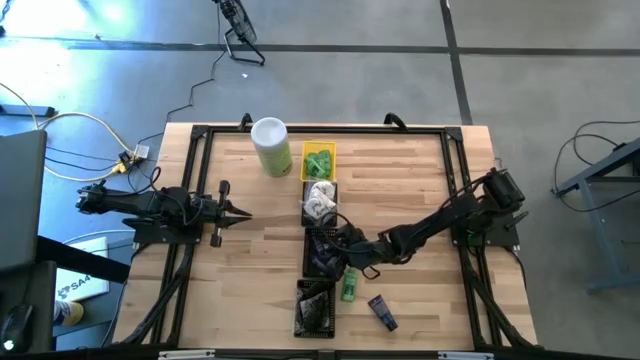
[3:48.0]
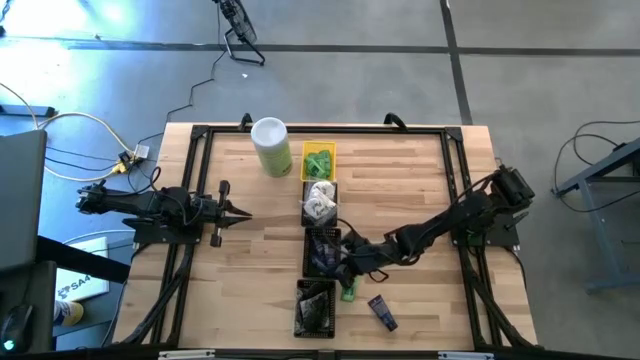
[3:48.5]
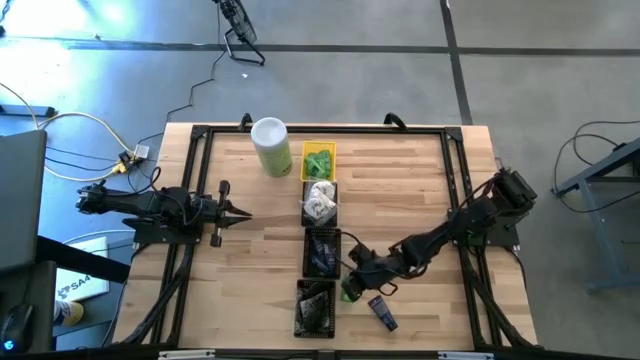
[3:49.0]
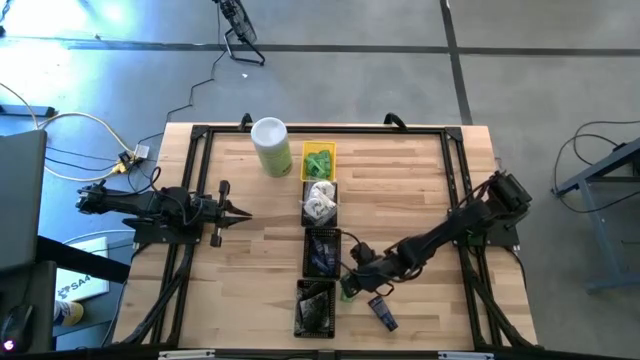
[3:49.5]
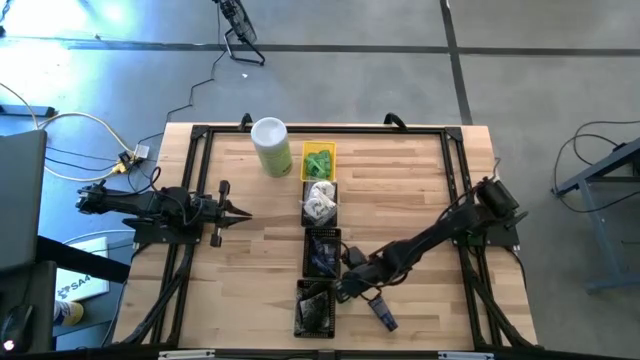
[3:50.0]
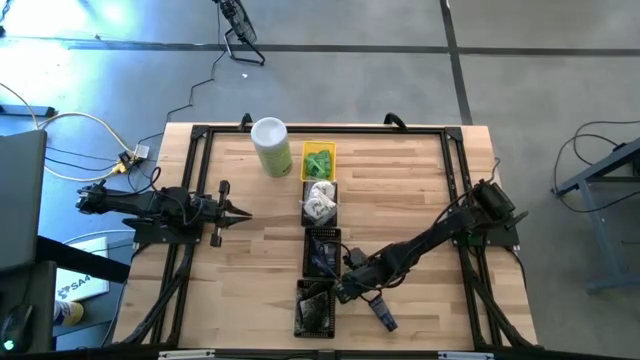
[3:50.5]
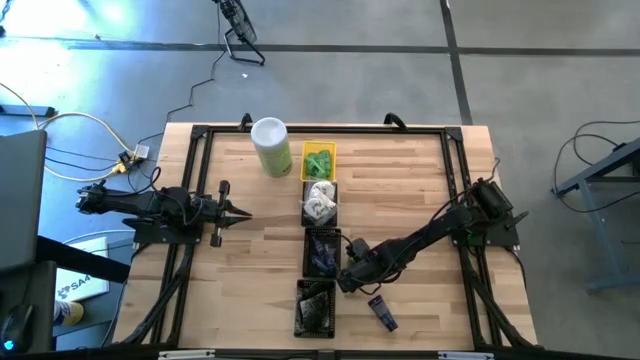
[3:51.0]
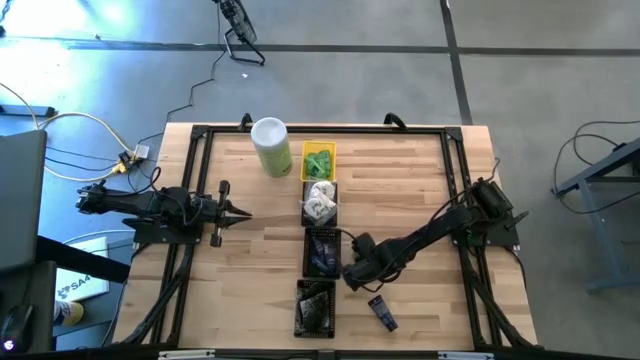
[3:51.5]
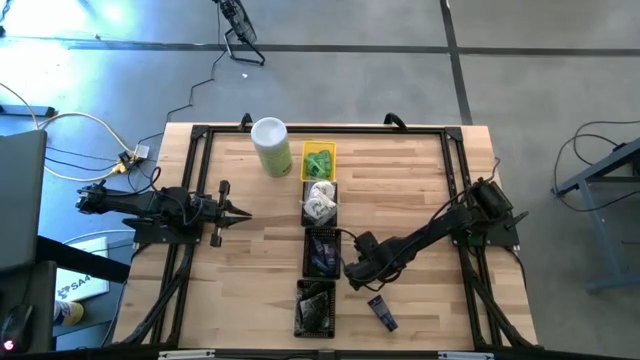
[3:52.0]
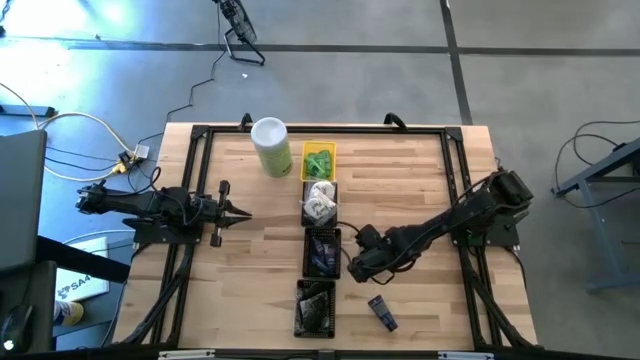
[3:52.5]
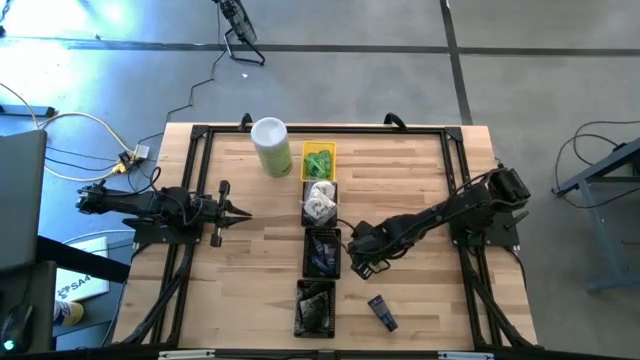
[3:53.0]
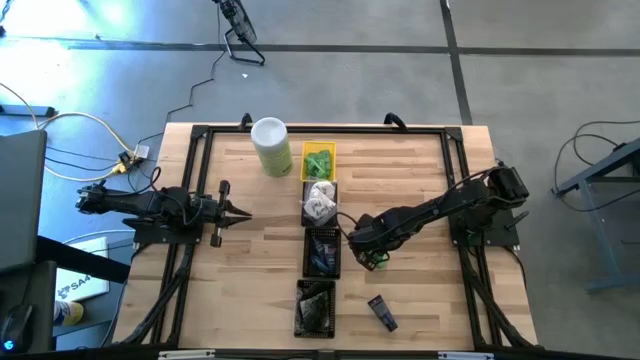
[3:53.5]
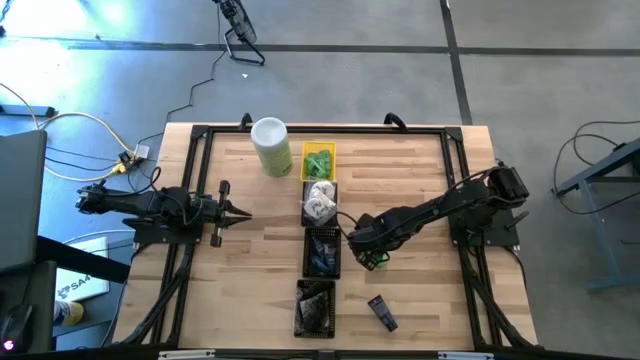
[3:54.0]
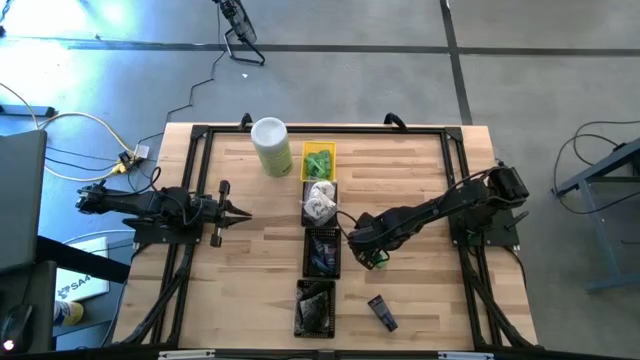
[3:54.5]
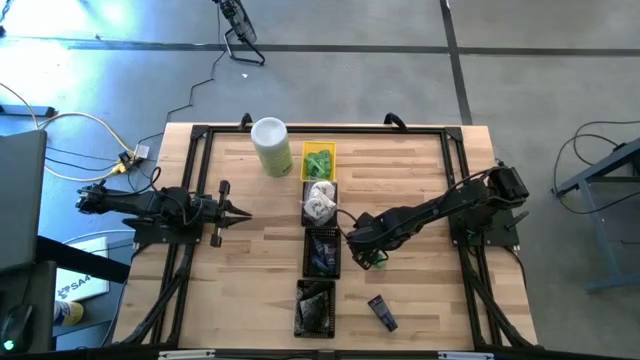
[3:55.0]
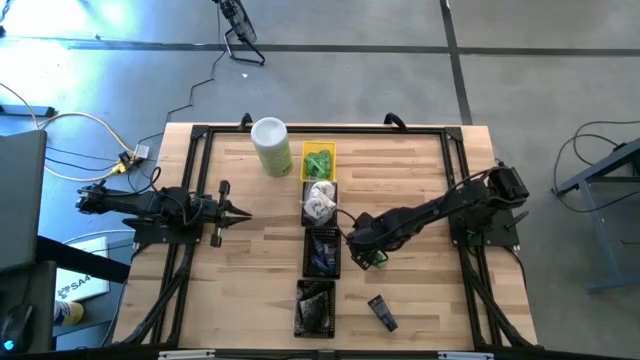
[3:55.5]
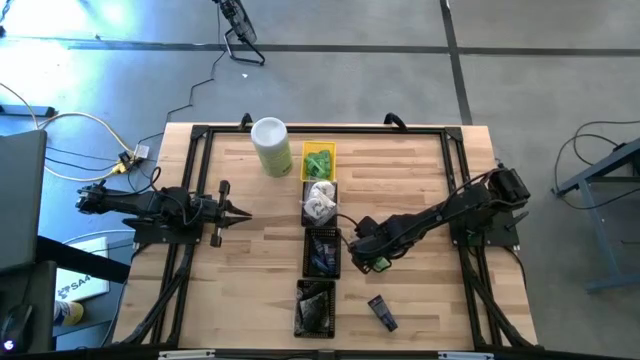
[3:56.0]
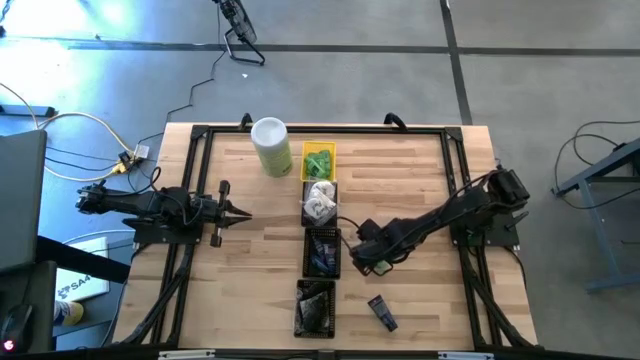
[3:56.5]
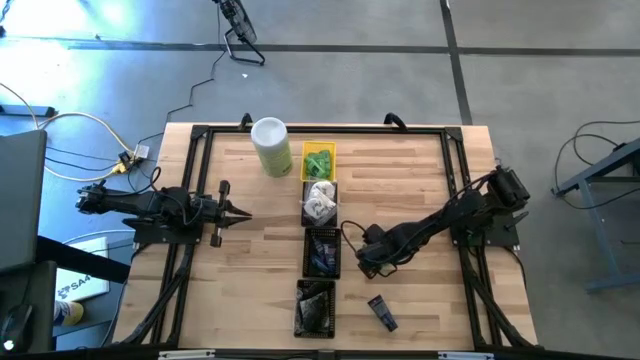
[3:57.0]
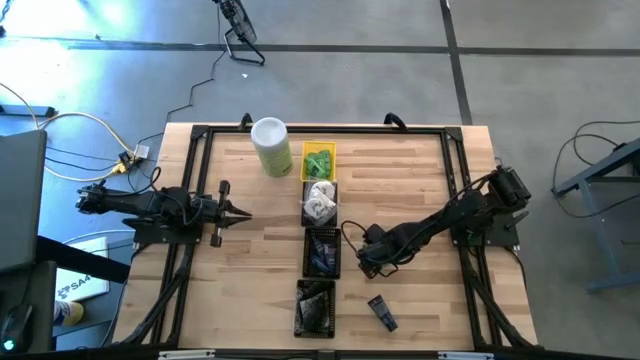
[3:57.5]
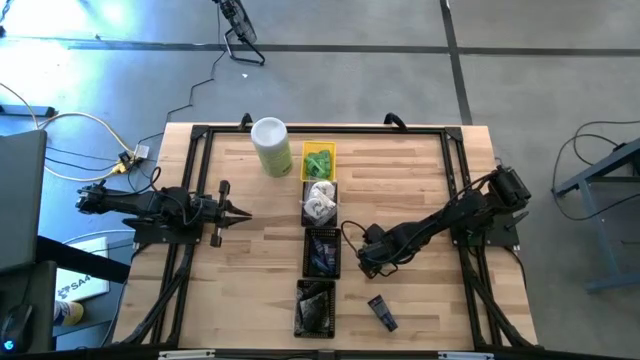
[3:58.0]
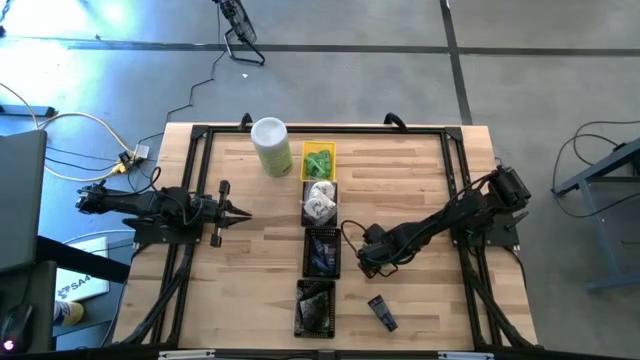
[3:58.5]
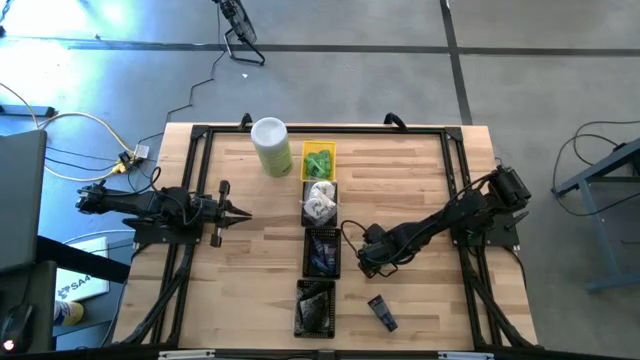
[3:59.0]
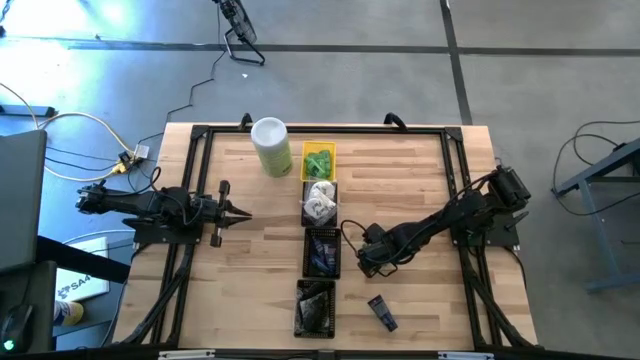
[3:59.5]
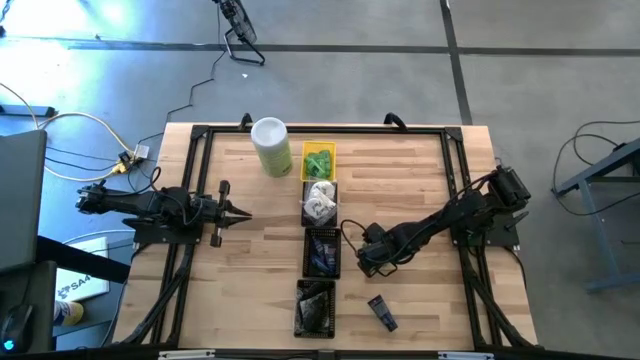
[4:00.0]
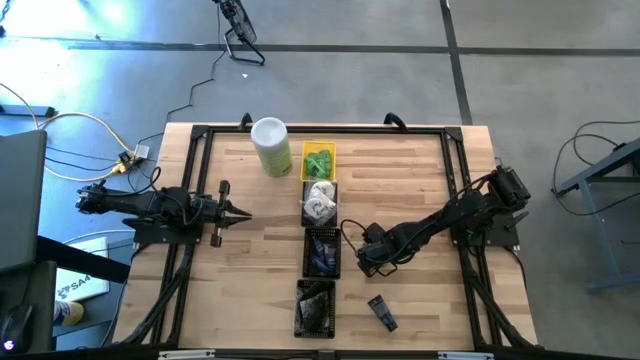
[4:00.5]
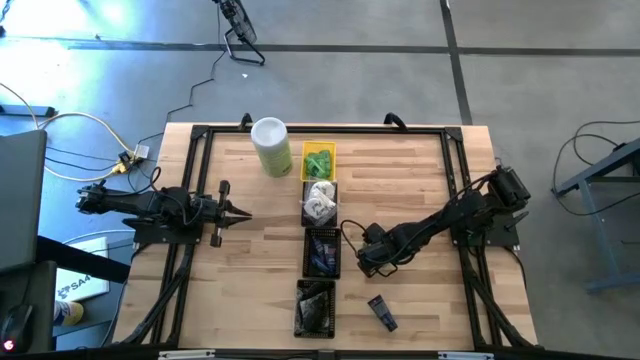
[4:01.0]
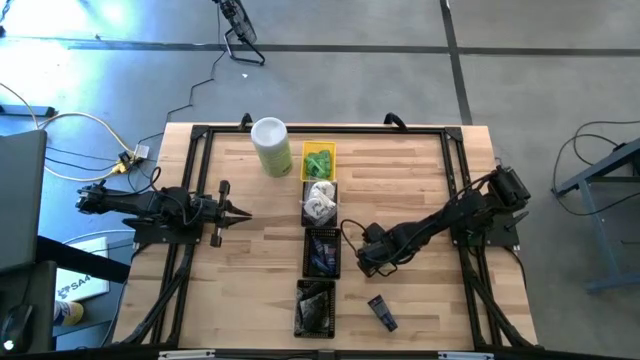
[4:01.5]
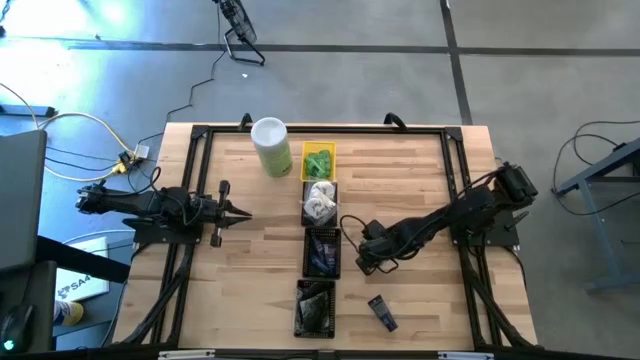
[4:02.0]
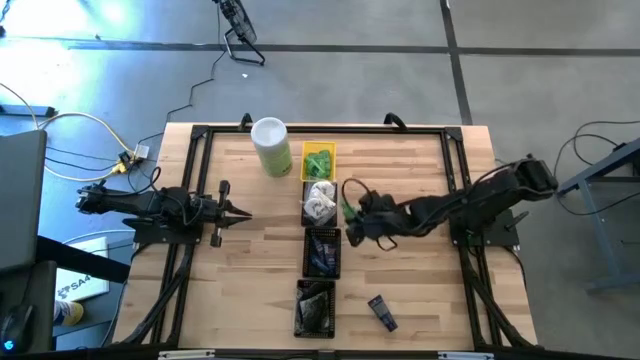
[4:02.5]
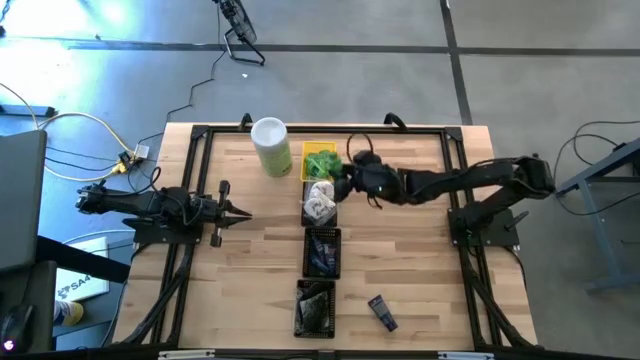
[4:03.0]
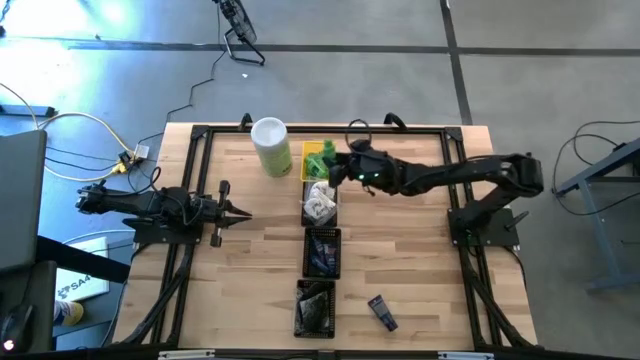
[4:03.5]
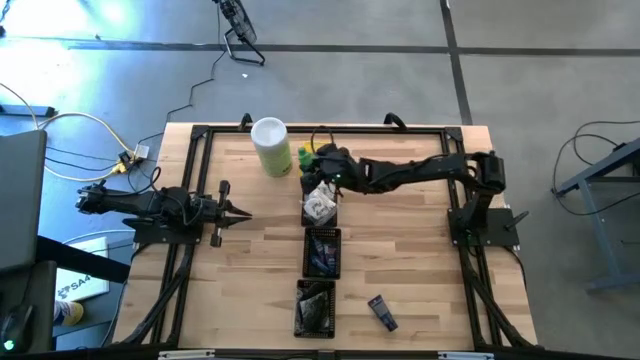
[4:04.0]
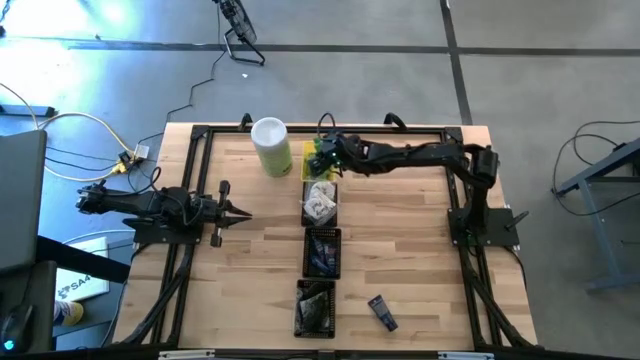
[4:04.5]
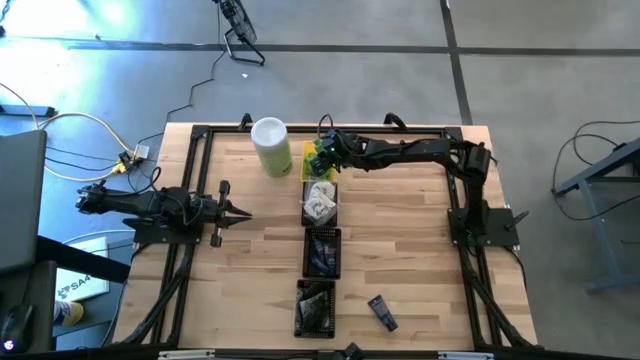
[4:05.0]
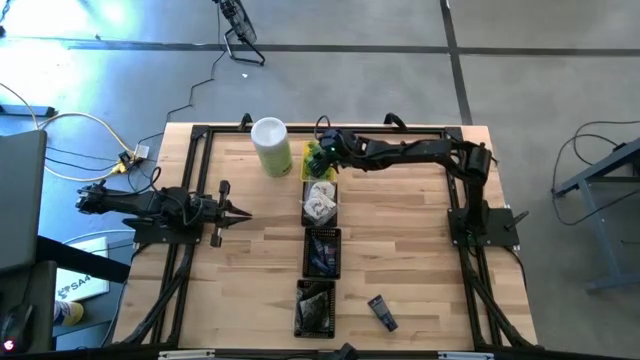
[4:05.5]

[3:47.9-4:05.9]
Task: Pick & Place Travel size toiletries
Put the green bottle into the yellow basket

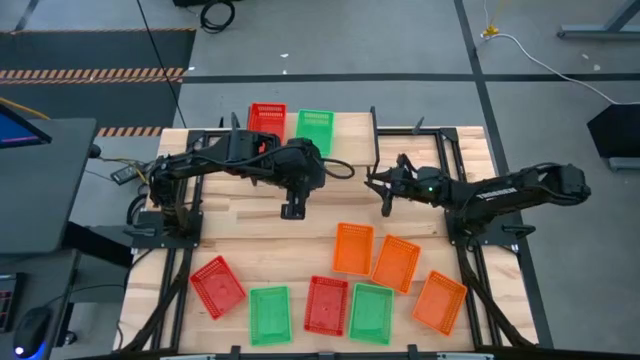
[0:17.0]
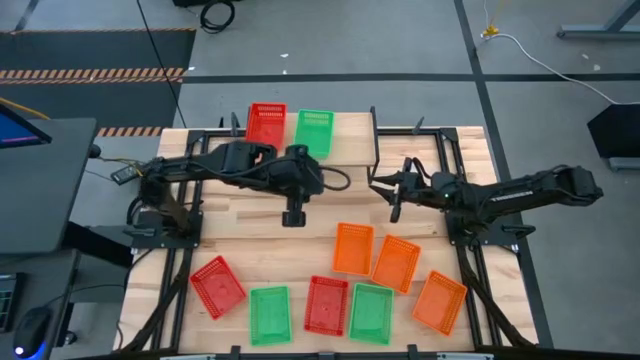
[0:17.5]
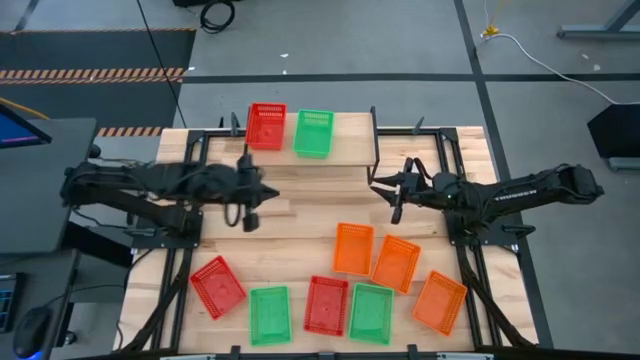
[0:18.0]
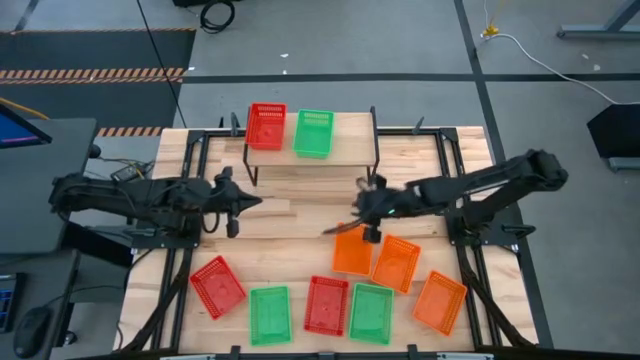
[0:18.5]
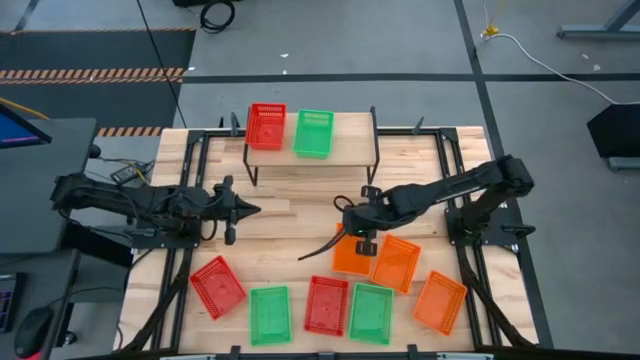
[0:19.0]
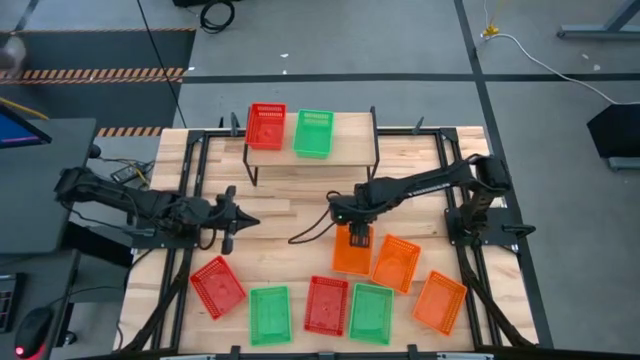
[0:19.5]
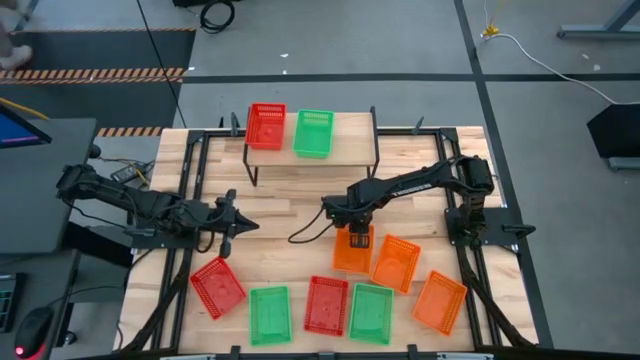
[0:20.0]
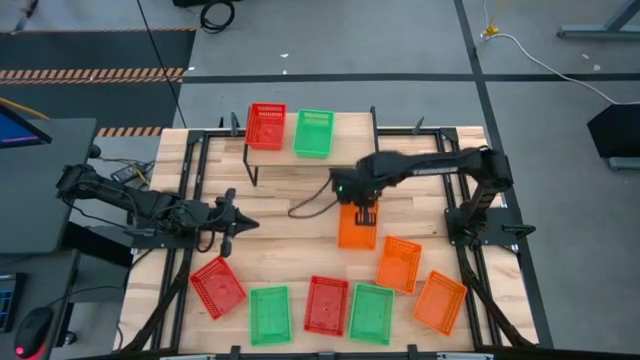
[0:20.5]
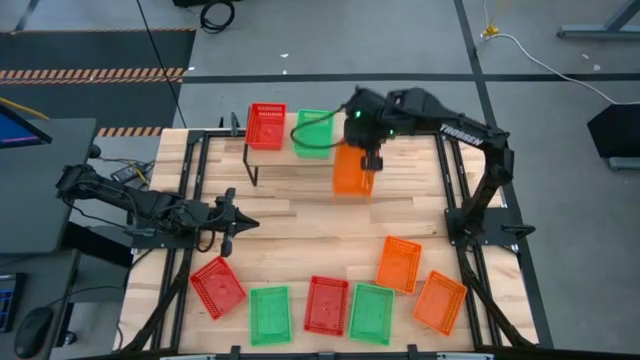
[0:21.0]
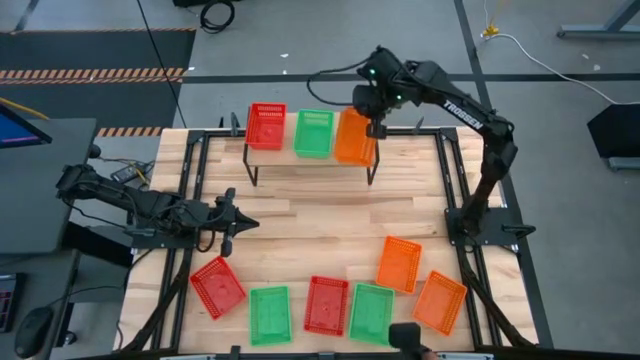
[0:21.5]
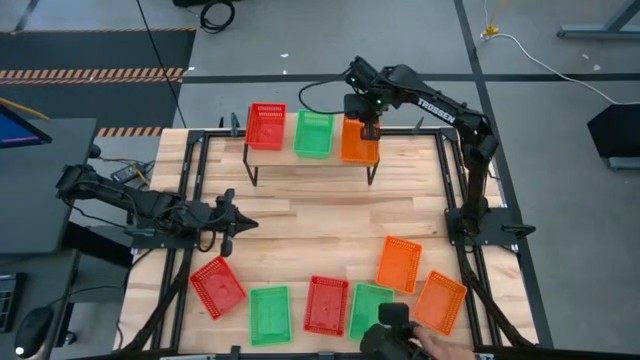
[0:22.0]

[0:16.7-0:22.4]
Task: Stack baskets on shelf by color
Put the left orange basket on the shelf
